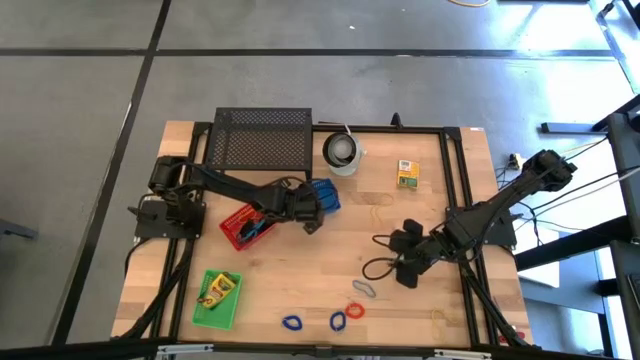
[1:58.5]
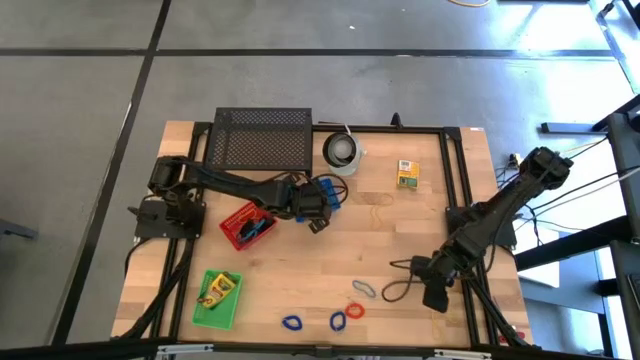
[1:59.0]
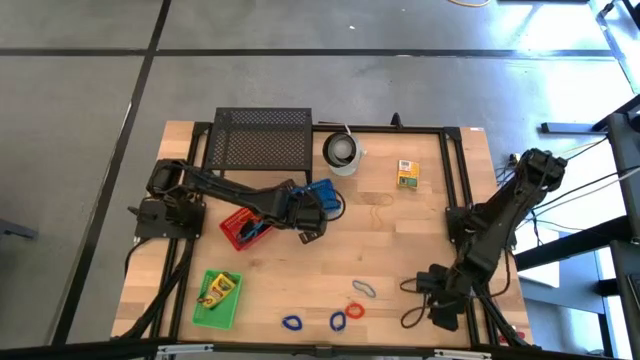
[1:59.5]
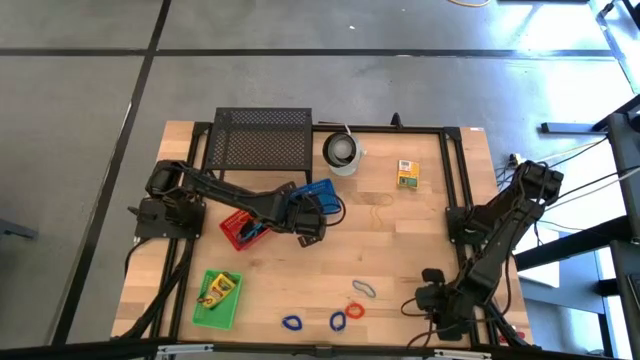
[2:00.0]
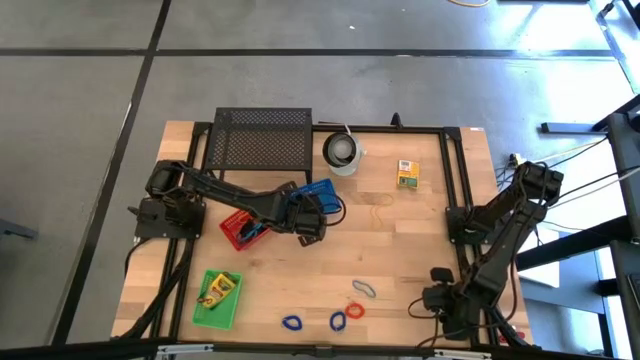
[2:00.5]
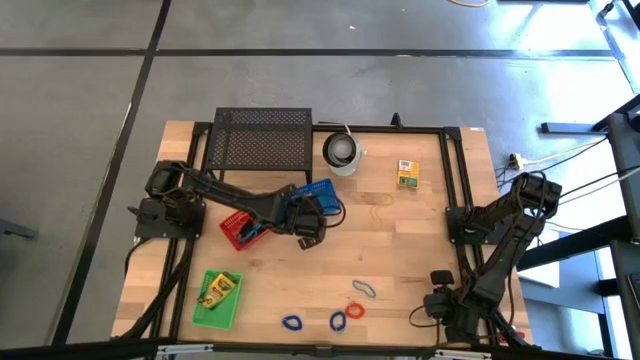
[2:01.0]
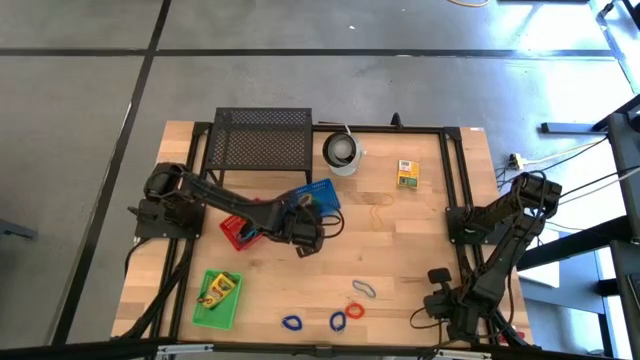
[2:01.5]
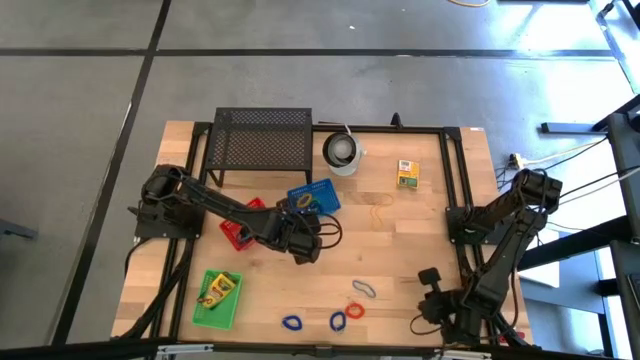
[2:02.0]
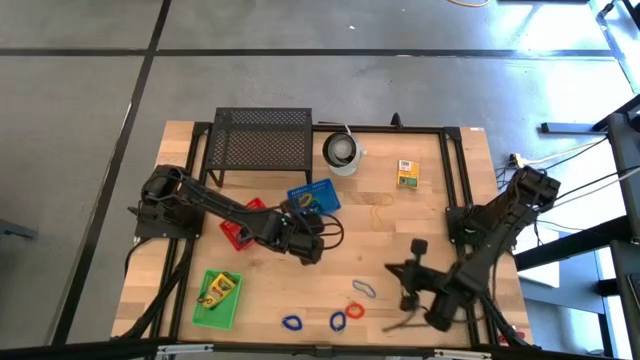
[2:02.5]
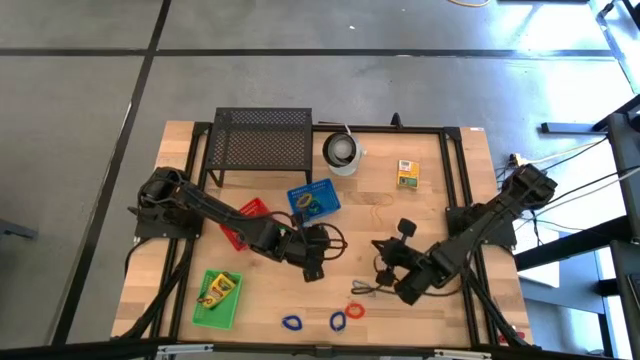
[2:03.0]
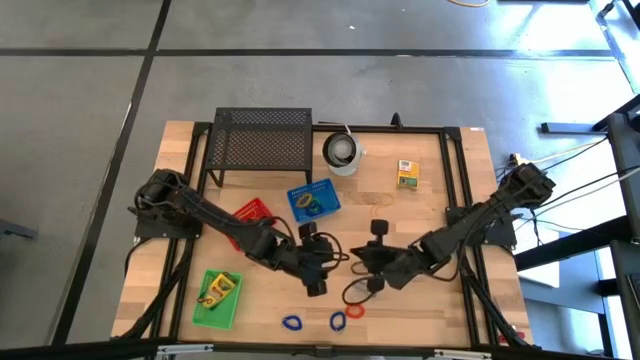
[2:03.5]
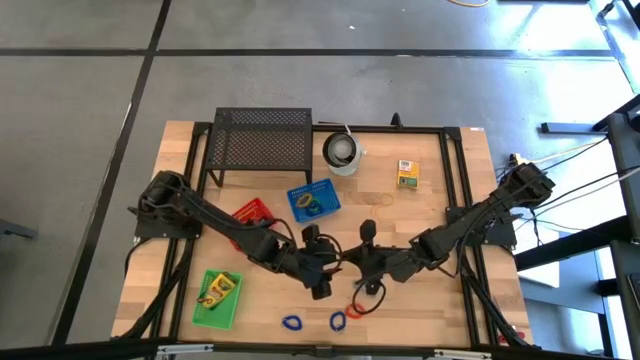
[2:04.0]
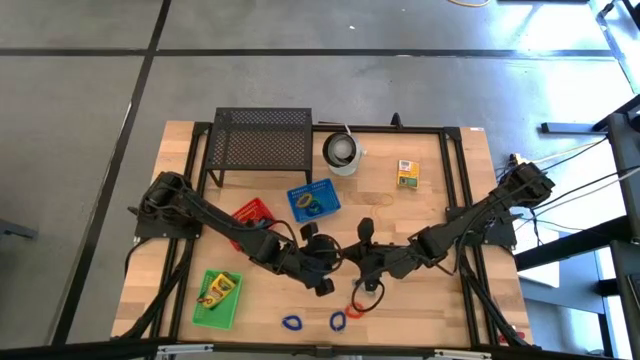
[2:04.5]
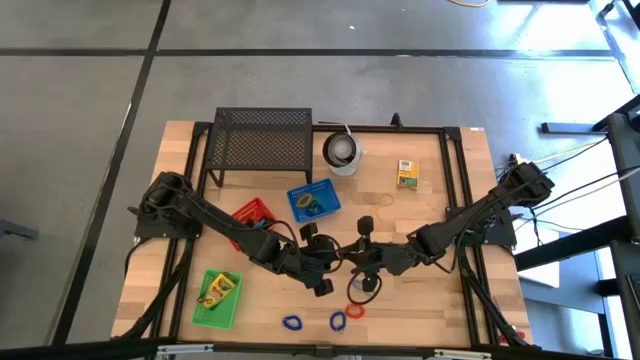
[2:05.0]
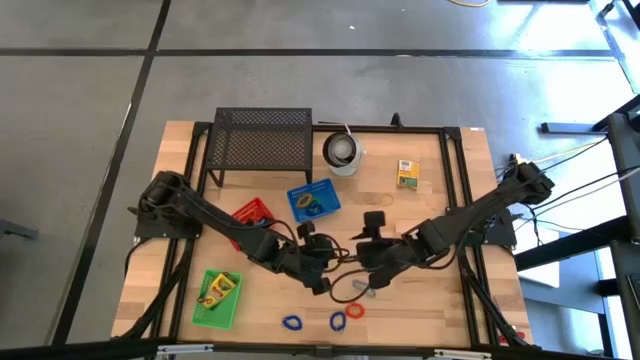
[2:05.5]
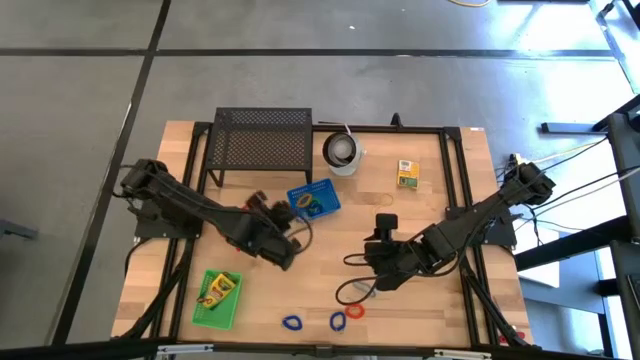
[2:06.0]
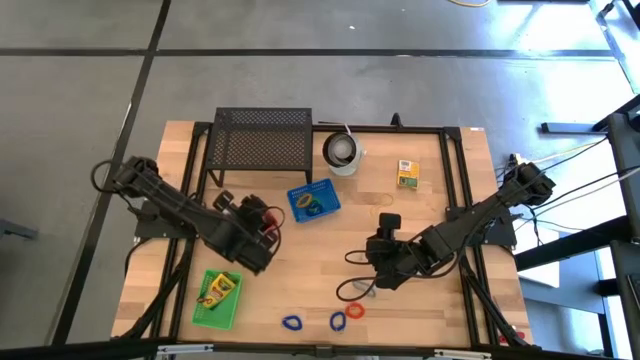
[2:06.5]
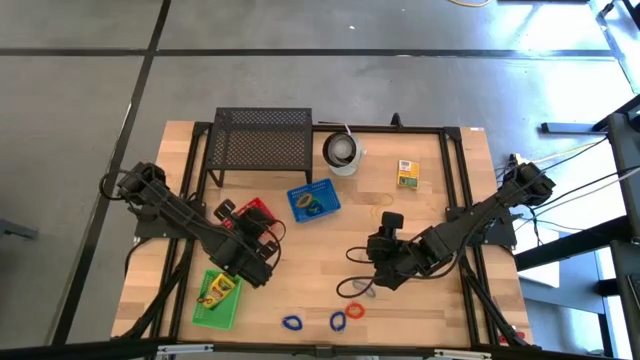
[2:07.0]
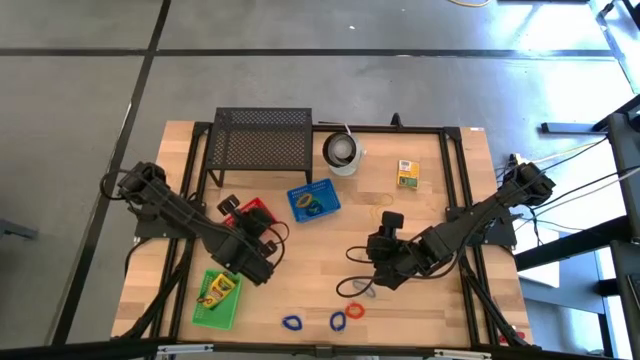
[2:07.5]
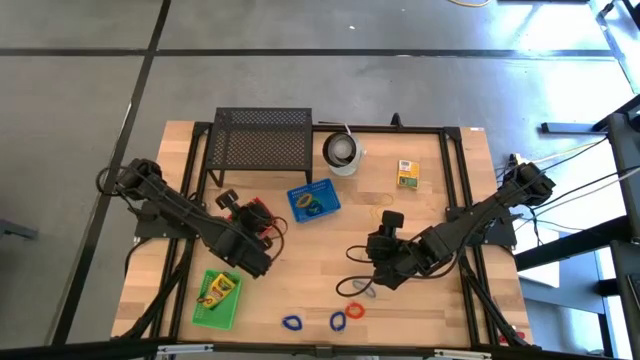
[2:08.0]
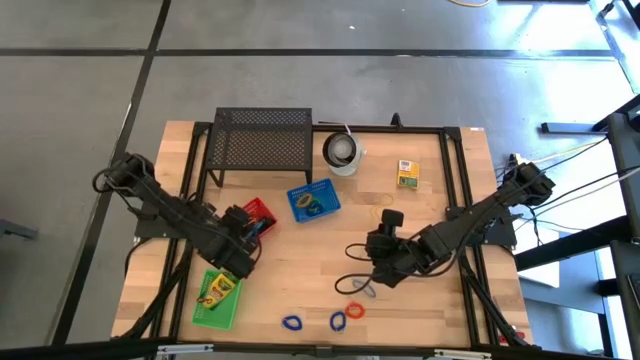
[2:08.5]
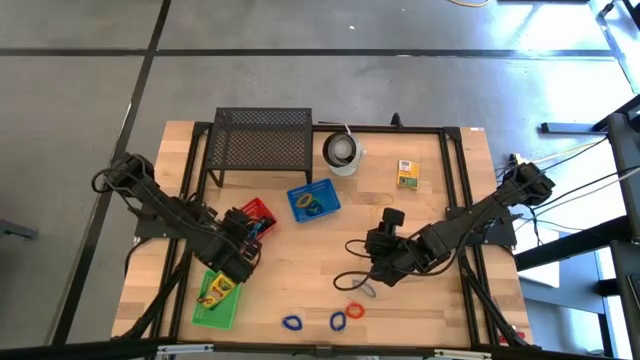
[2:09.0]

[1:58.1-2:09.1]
Task: Pick & Place Office Desk Supplies
Put the yellow rubber band into the red bin

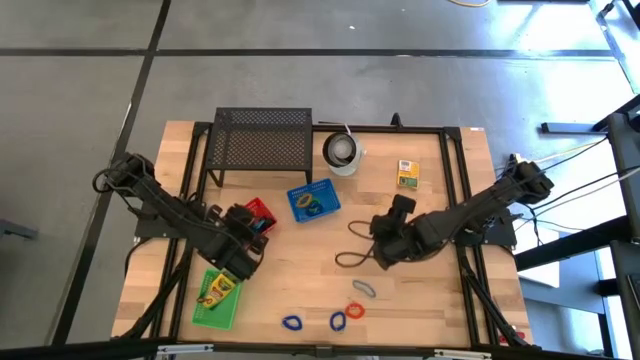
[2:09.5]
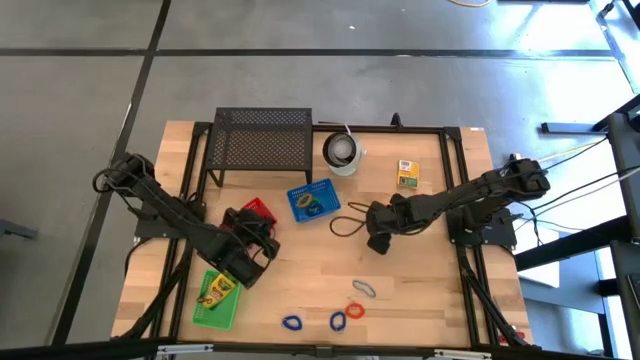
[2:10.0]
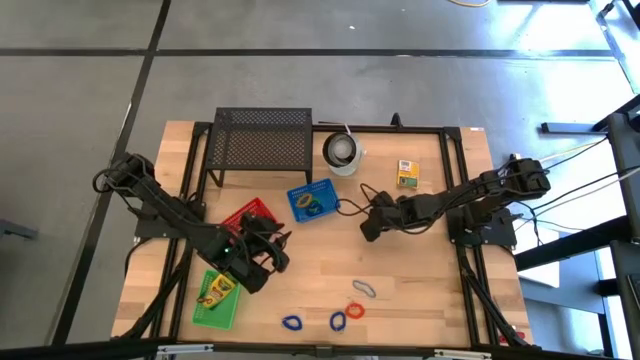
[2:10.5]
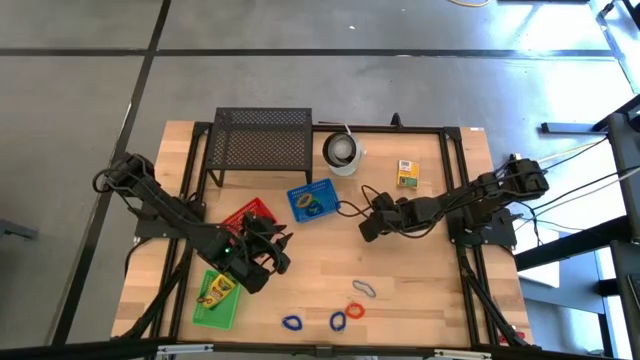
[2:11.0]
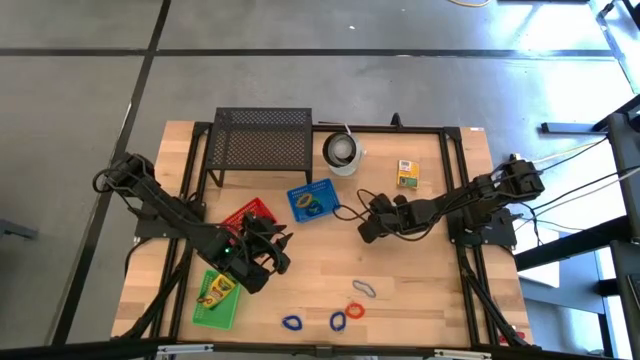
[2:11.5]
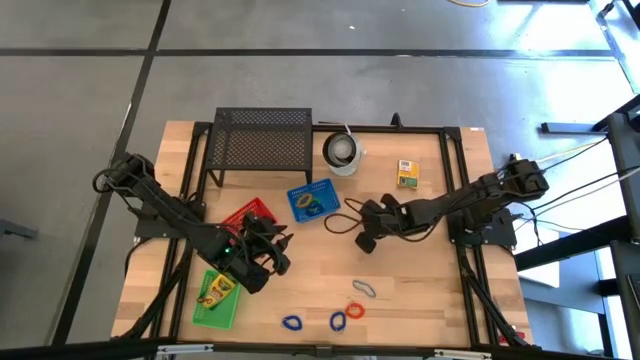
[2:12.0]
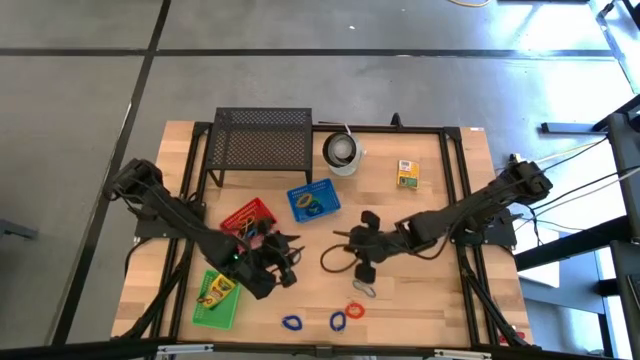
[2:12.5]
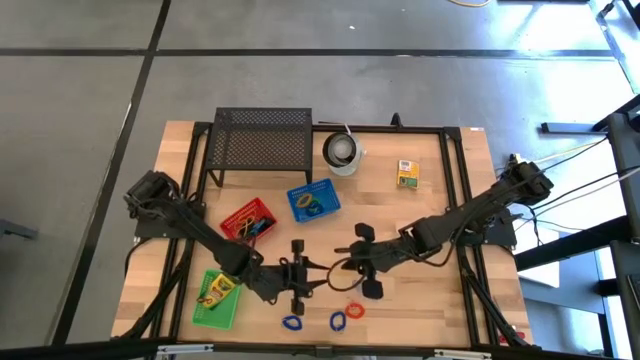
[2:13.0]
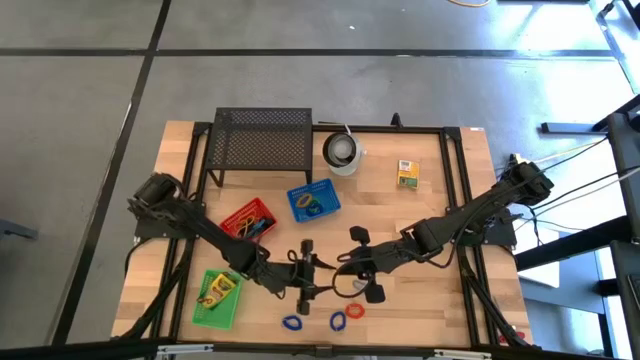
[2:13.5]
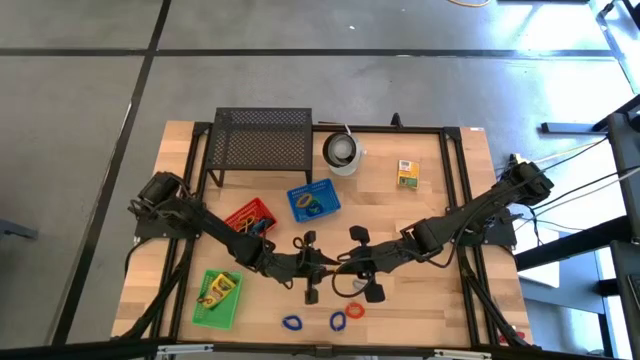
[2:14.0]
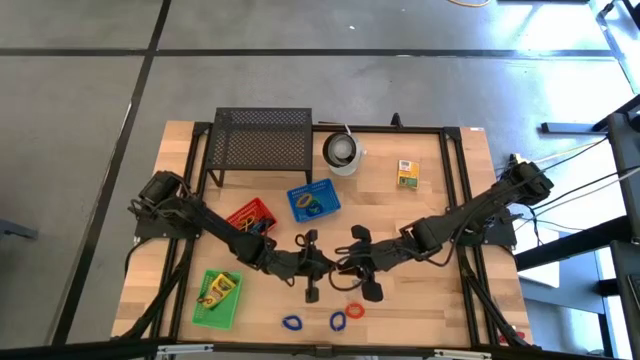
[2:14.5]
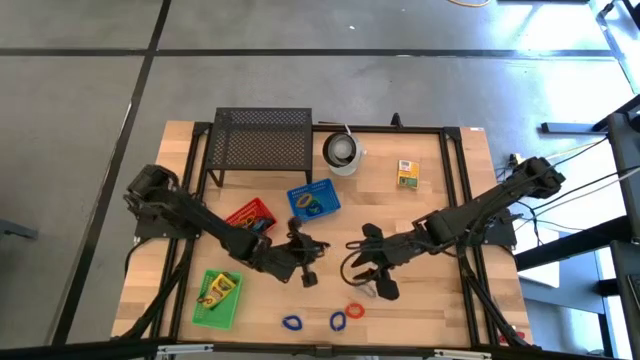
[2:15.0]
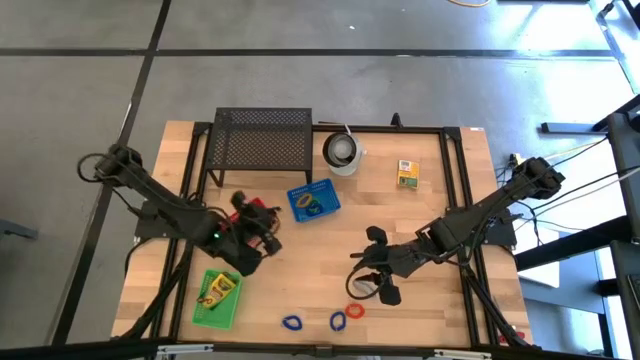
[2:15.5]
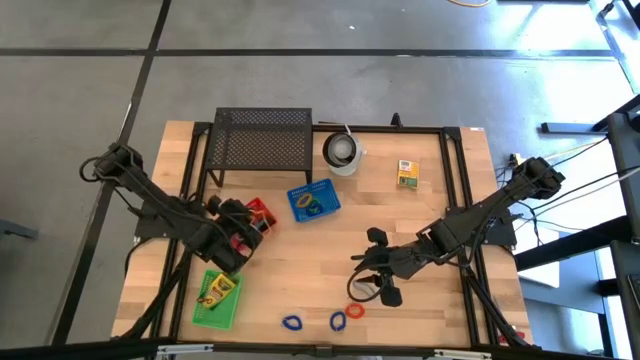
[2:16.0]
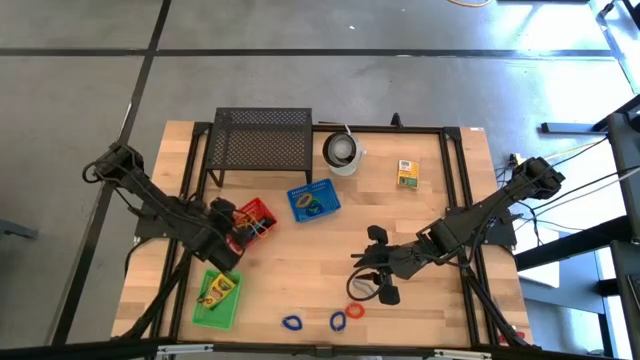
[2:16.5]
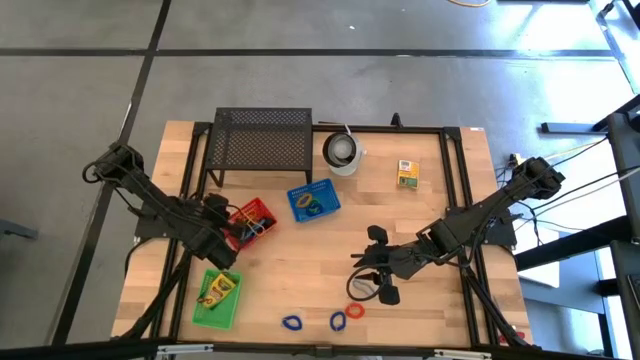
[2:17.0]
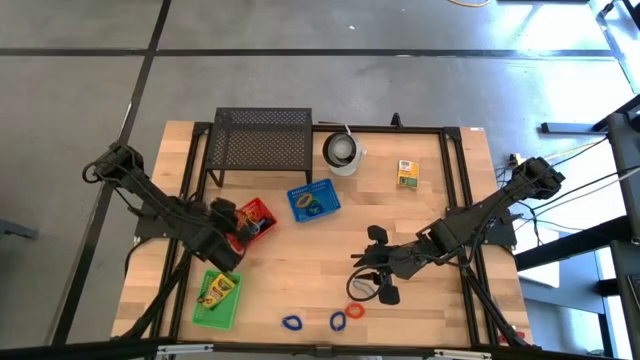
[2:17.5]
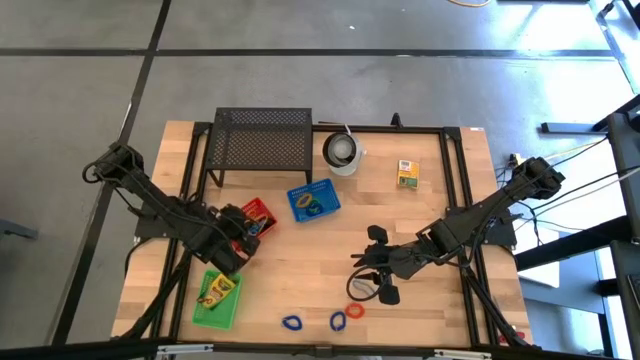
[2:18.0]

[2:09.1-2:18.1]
Put the yellow rubber band into the red bin

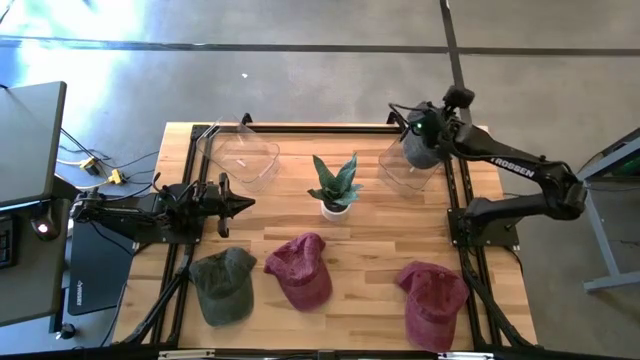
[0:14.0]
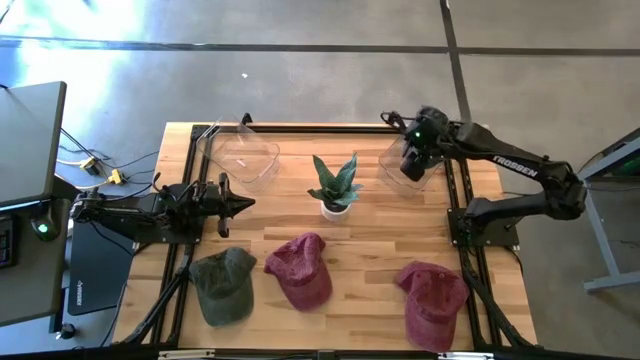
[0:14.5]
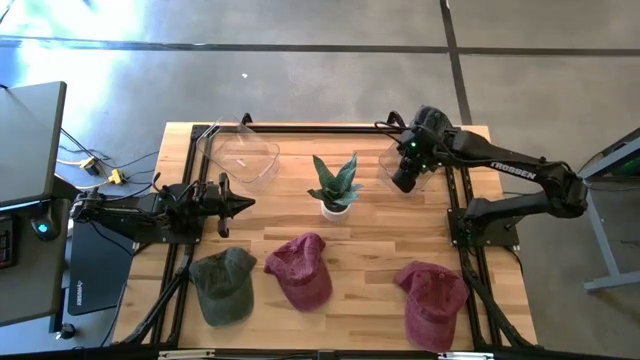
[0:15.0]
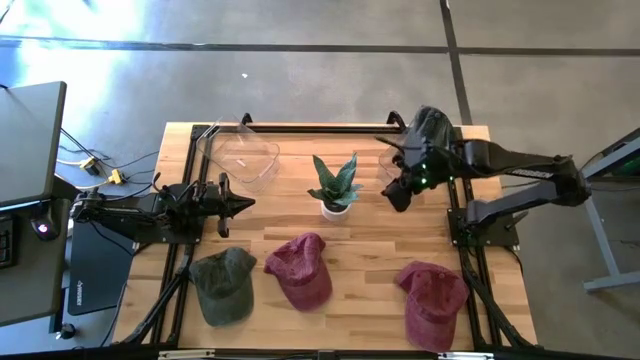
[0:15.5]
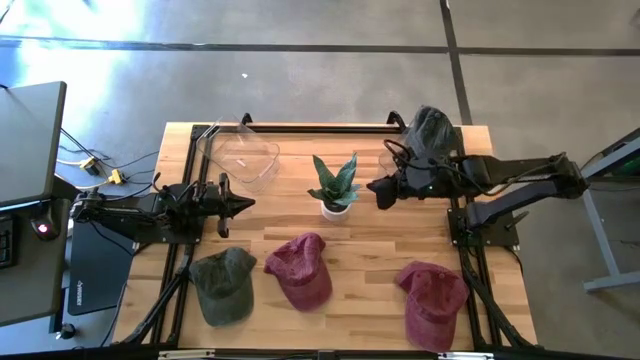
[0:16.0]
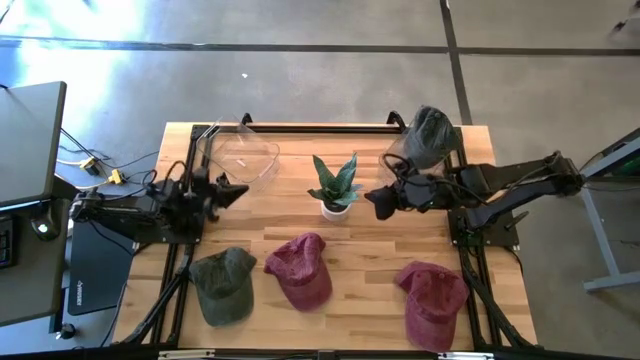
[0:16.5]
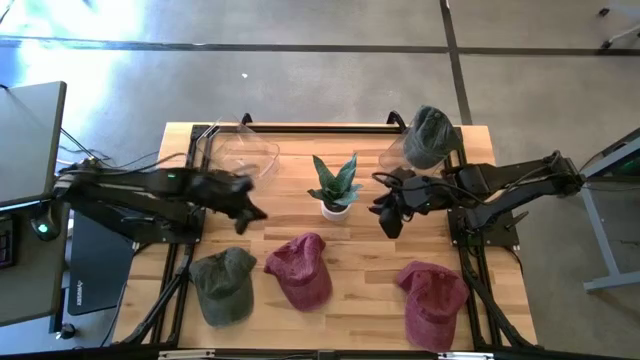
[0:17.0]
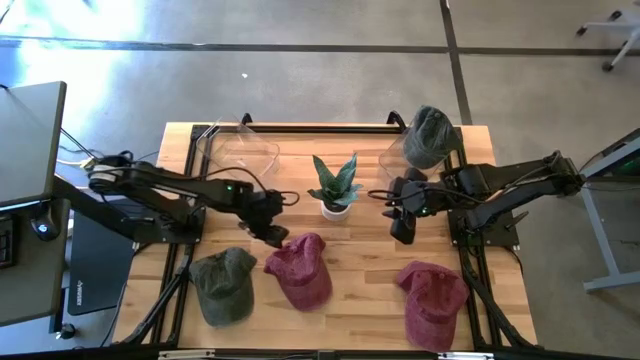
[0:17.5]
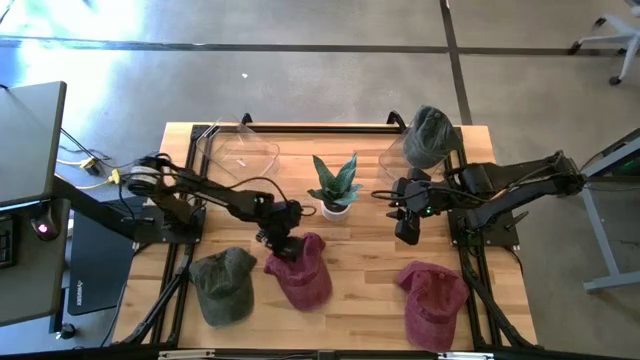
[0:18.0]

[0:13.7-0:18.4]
Task: Pick & Place hat
Put the left red cap into the left transparent bin
